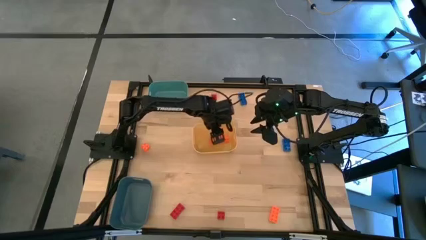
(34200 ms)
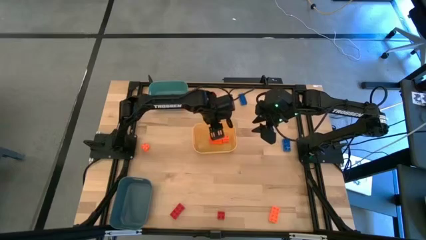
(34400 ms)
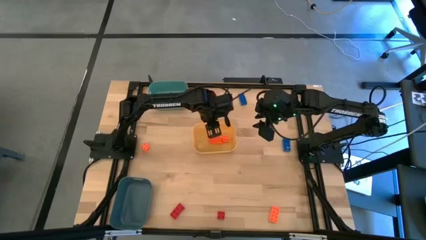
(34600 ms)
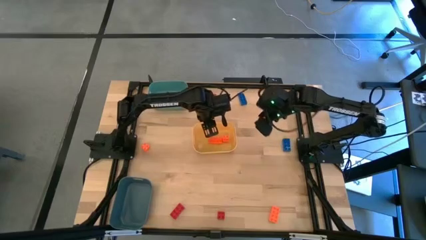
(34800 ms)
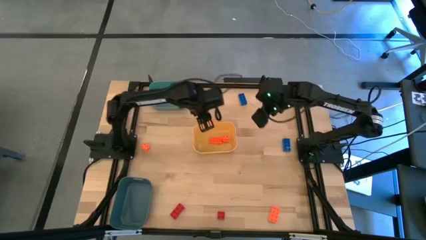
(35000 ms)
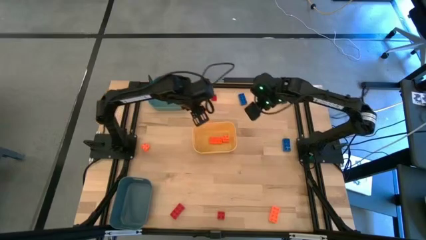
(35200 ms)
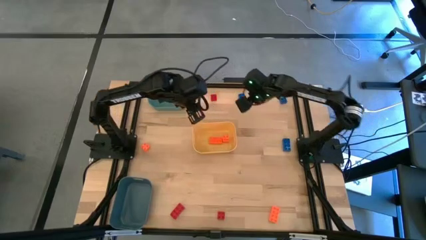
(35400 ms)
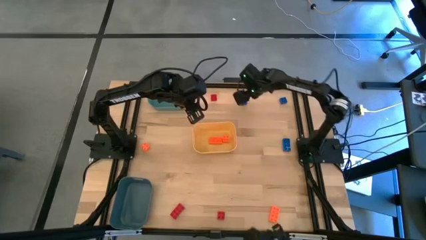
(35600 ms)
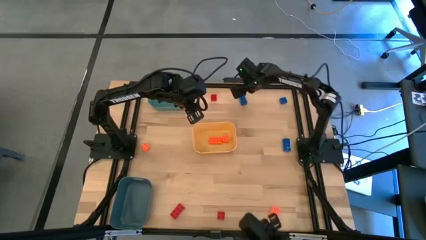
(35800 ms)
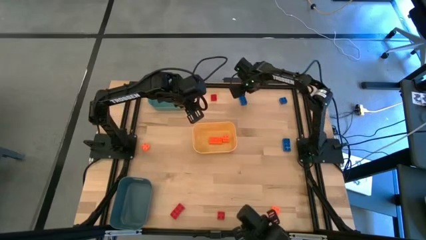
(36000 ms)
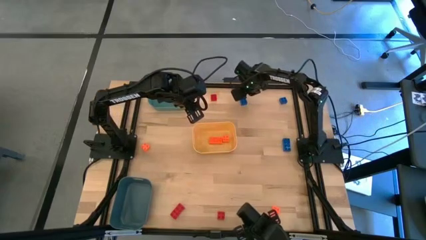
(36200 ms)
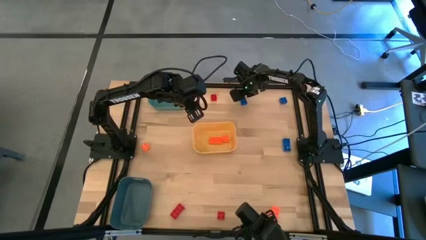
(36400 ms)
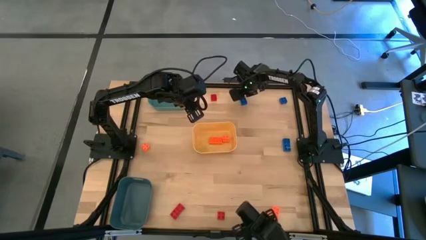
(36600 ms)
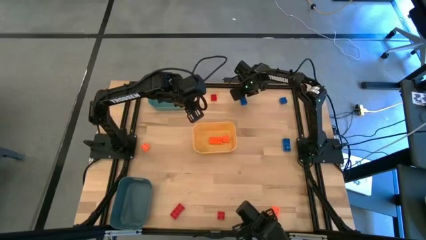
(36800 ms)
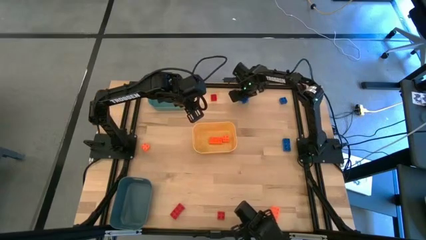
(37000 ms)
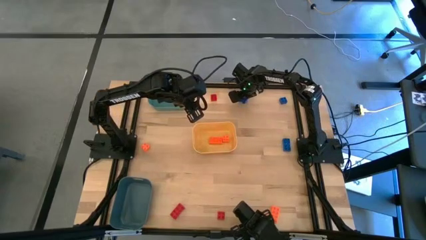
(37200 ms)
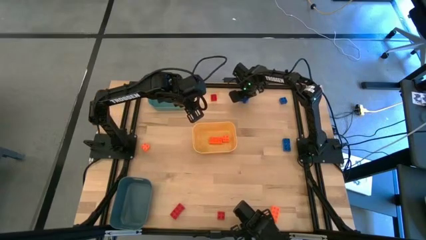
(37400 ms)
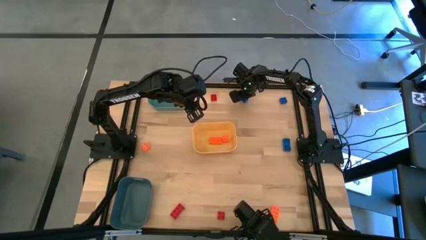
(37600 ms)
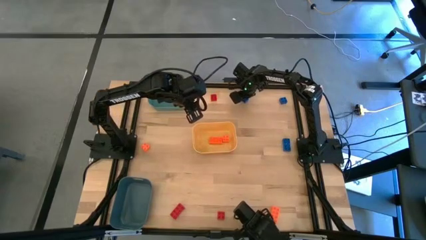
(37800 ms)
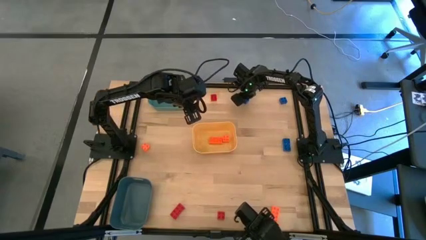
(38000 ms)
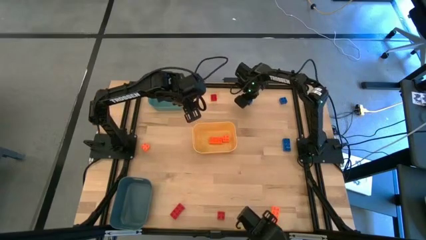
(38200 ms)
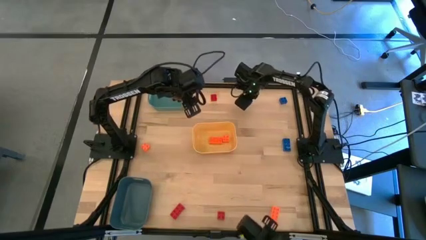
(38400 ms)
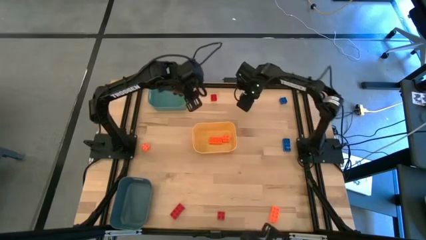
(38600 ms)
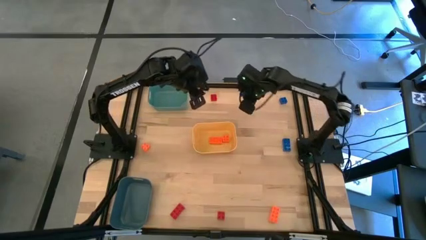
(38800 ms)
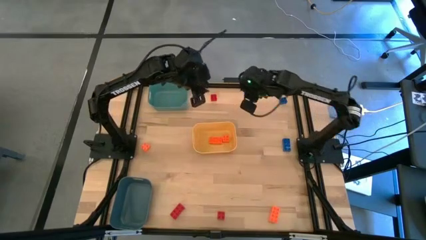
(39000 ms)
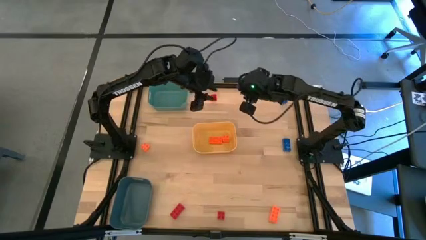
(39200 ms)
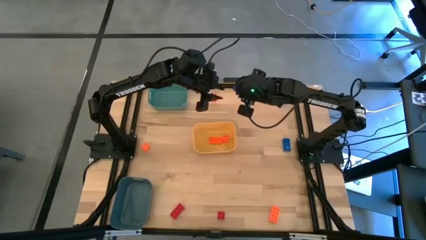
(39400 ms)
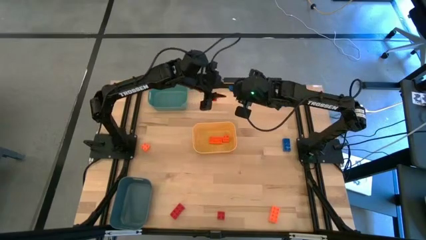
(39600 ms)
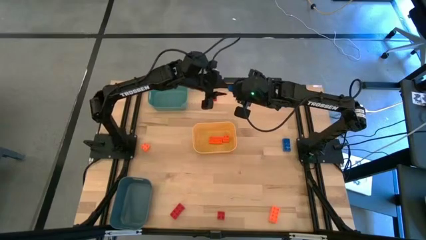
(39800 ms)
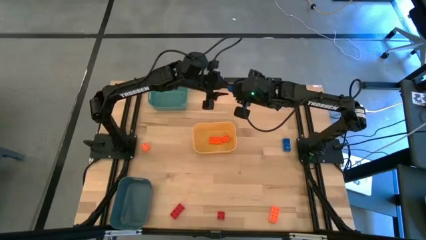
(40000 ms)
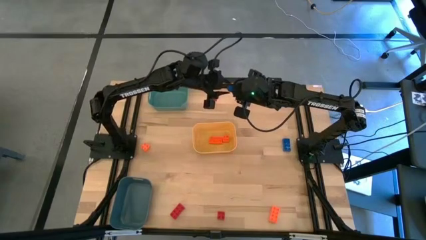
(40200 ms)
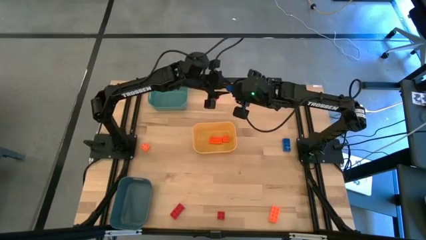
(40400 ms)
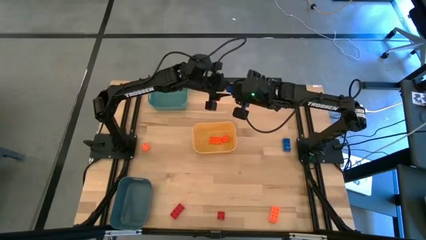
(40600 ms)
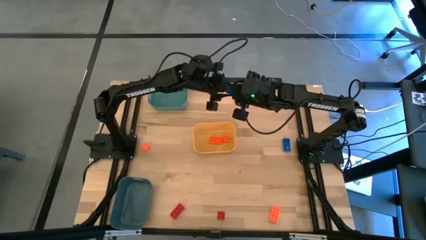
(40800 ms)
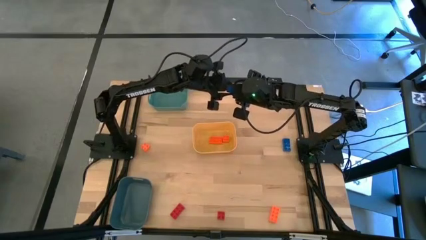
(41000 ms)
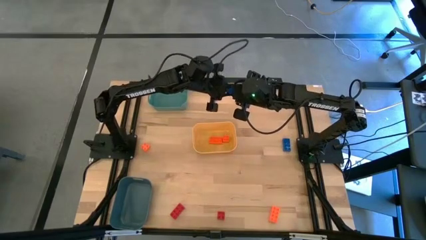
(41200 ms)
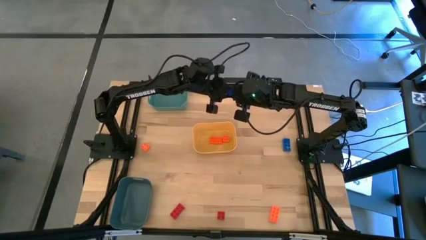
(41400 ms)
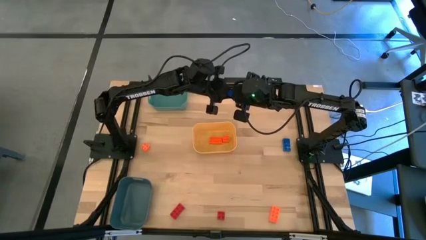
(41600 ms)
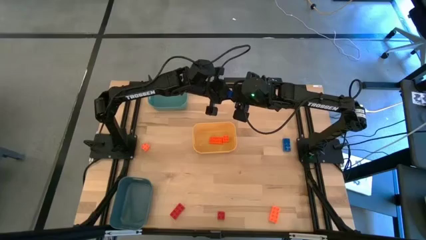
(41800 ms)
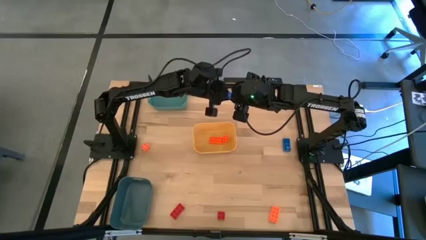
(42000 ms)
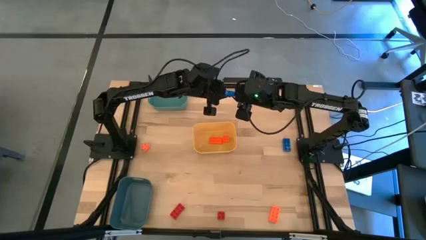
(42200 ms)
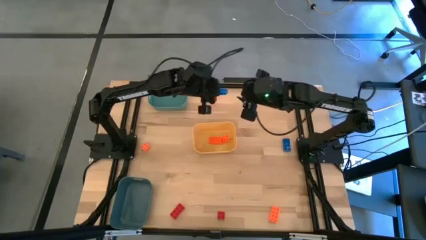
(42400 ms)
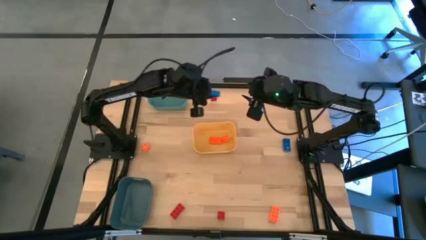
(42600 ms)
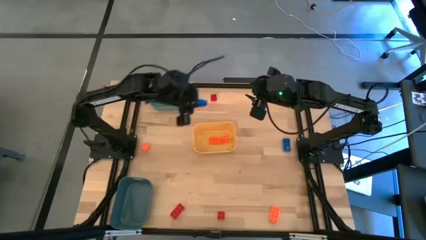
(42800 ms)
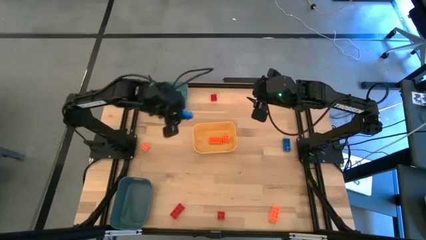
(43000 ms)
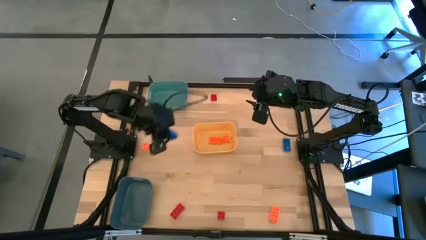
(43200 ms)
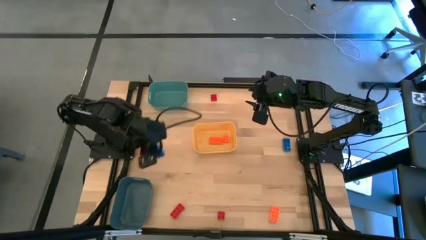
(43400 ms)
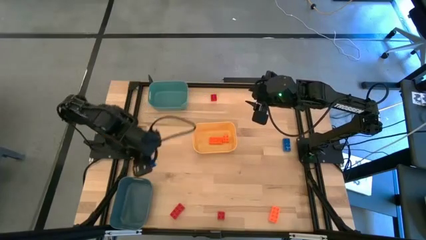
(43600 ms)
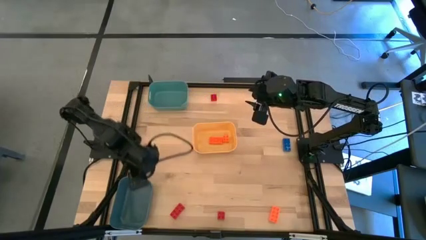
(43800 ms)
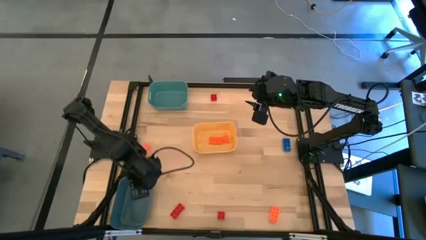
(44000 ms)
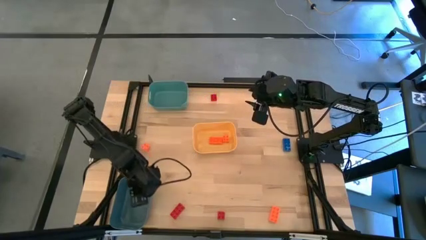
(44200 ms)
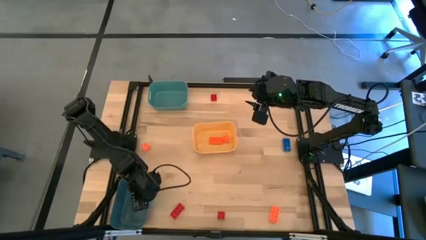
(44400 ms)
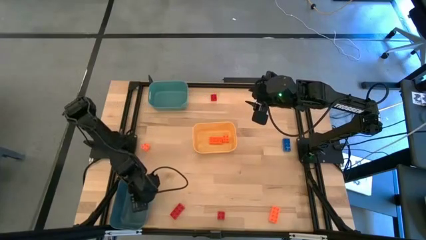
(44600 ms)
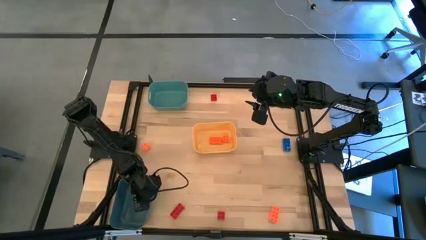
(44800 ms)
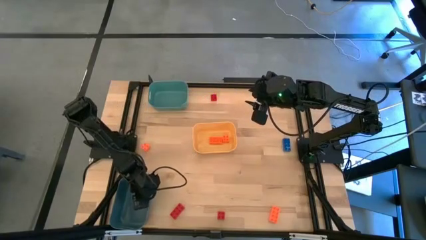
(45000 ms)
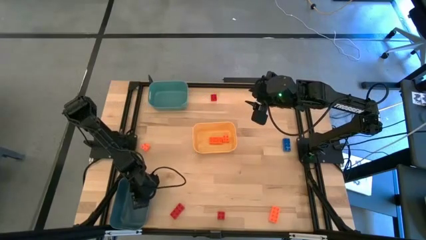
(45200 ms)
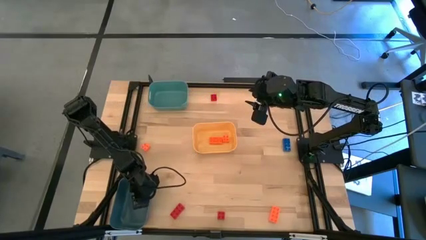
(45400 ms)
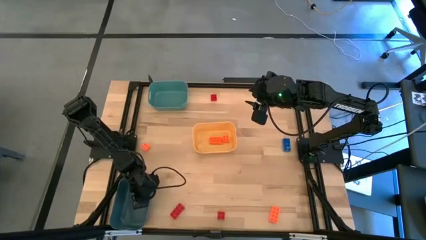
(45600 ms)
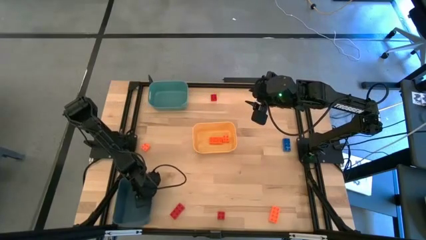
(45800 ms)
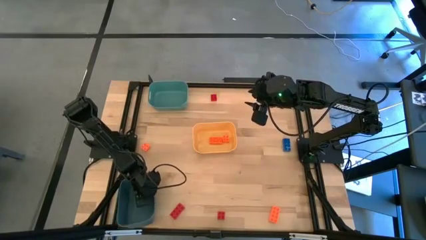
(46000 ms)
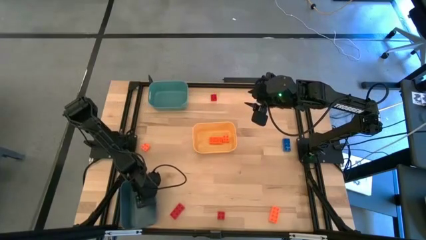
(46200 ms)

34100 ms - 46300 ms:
Task: Sort & place blocks by color
Put the top left blue 8 stud game piece into the blue bin

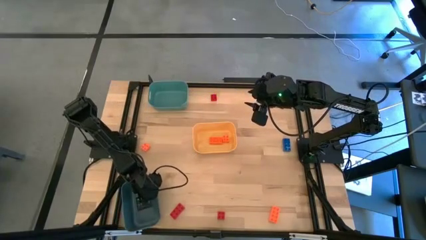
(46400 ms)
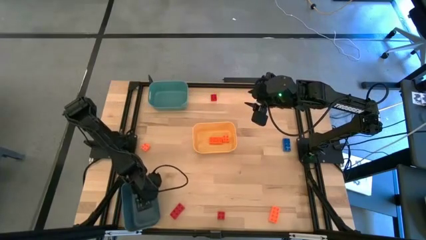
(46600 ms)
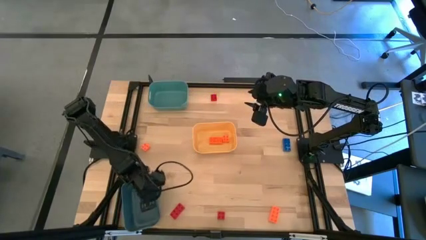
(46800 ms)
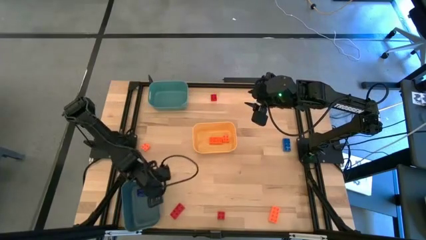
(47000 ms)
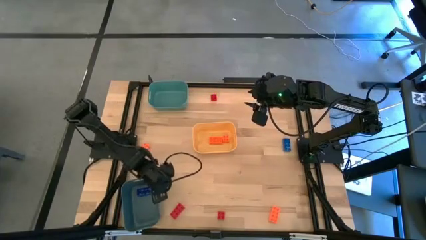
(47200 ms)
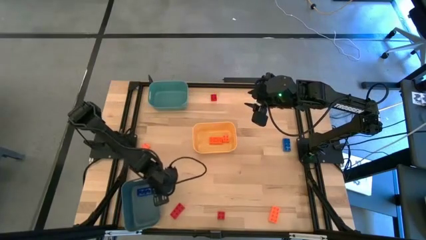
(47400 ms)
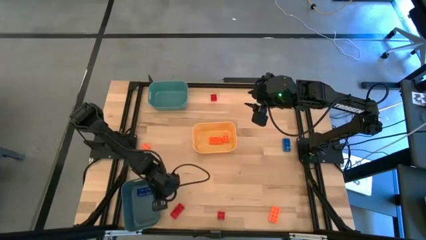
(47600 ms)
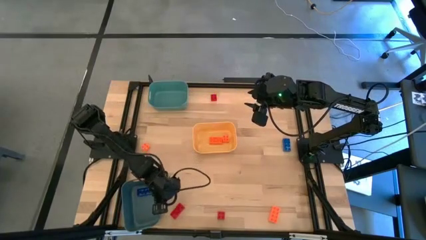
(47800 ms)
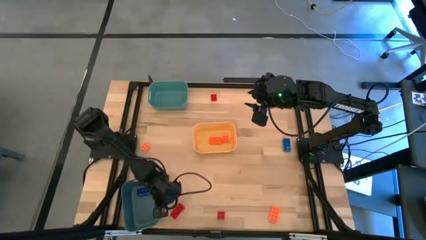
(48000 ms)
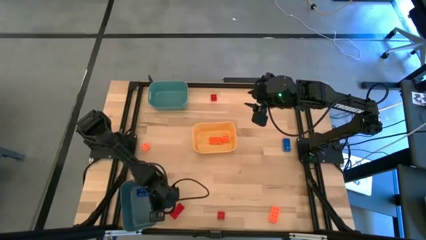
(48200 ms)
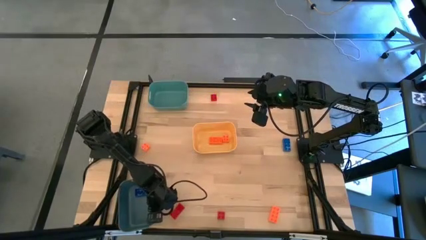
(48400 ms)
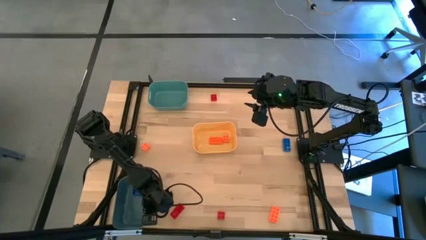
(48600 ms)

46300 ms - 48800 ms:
Adjust the blue bin

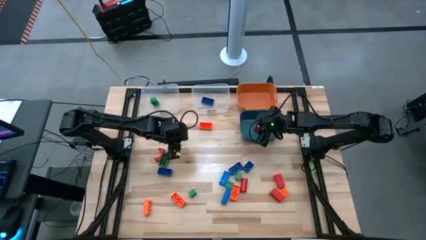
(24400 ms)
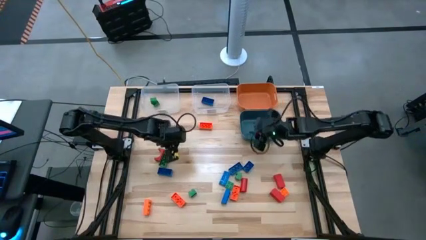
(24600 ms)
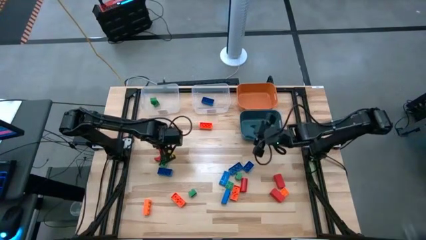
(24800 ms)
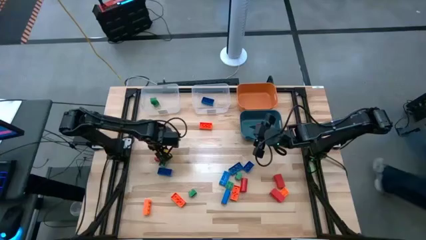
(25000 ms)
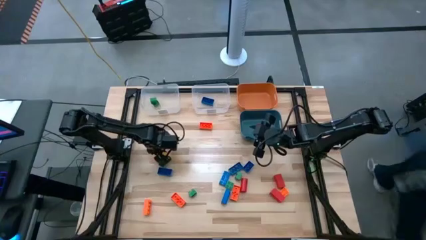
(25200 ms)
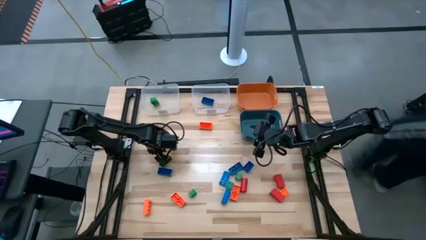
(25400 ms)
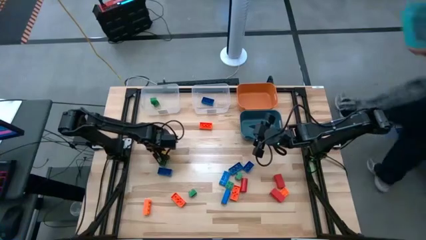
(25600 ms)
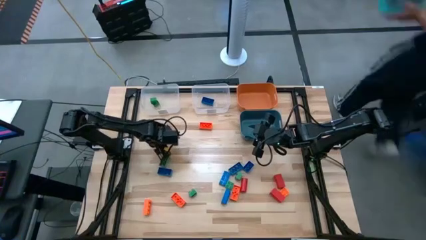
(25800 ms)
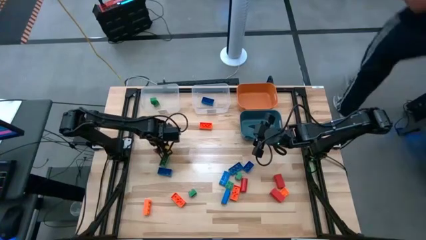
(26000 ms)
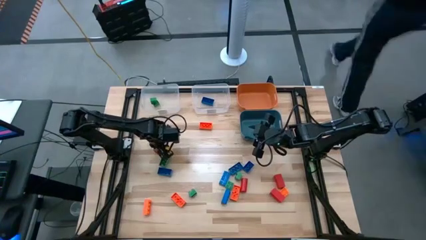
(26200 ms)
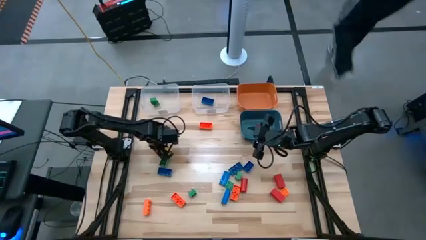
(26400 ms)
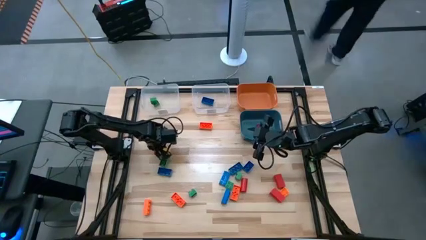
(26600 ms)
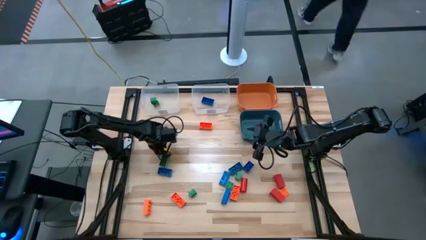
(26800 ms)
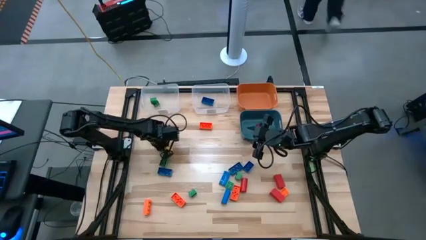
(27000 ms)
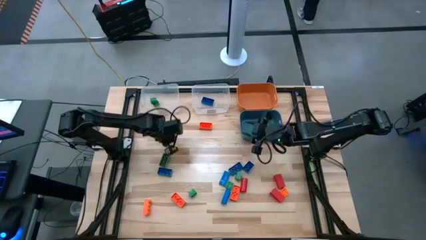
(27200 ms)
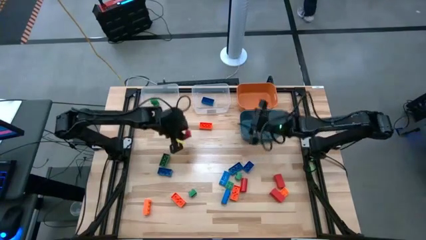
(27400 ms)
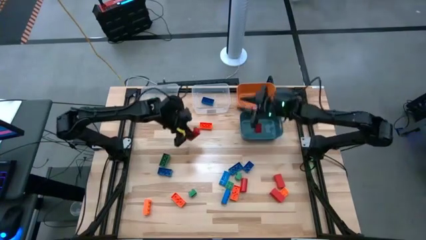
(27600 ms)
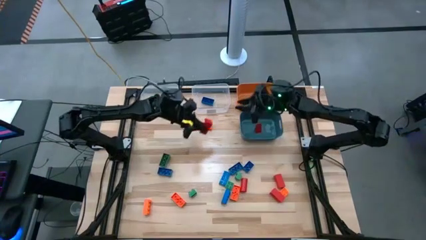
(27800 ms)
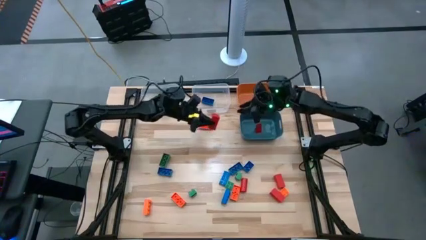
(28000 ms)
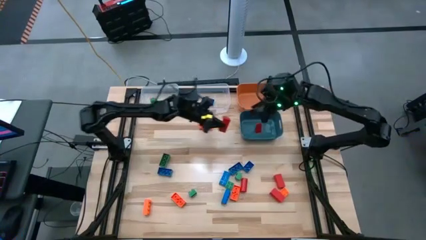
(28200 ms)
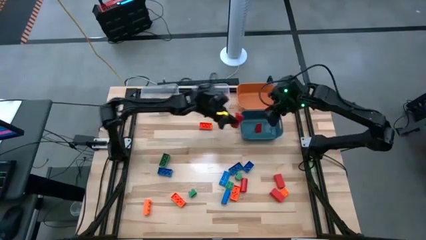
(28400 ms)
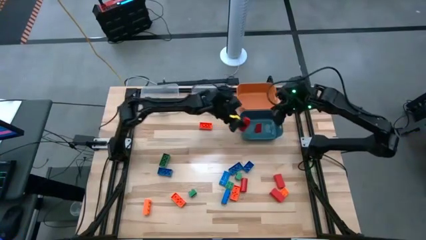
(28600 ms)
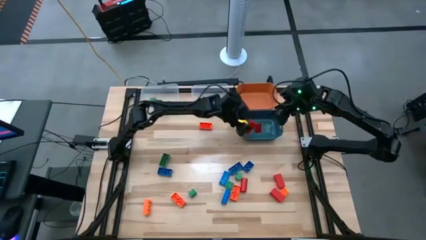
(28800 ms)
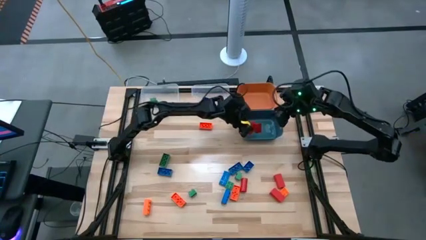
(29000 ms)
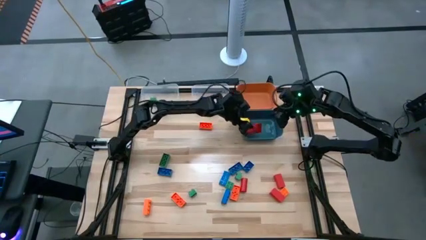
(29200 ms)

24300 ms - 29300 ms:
Task: Sort blocks
Put the red block into the blue bin
